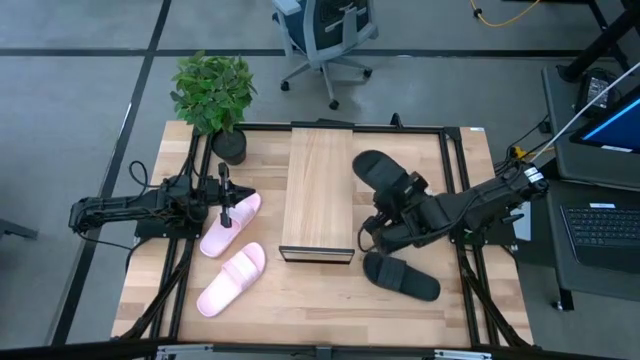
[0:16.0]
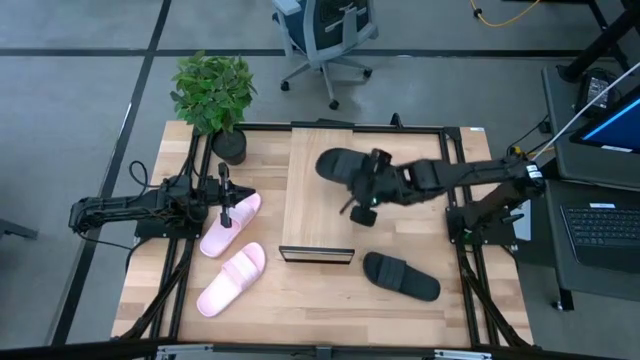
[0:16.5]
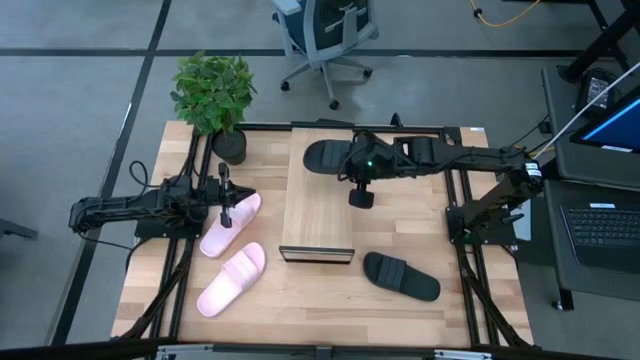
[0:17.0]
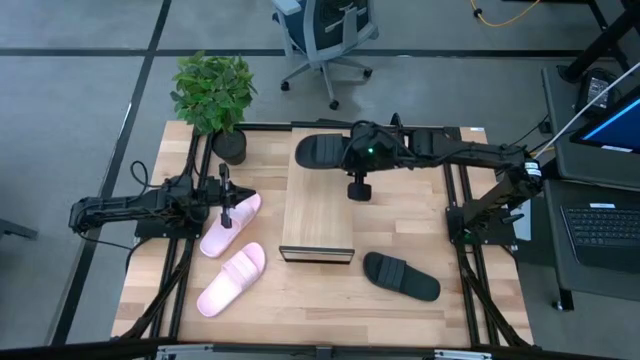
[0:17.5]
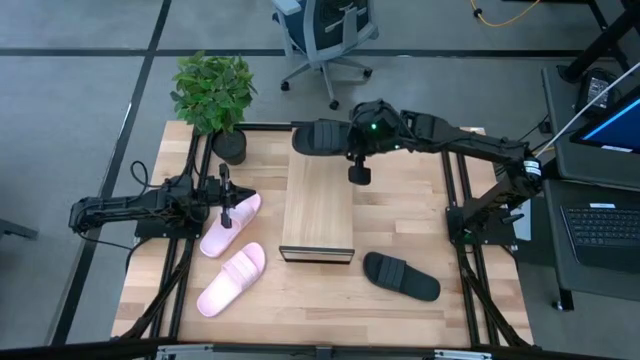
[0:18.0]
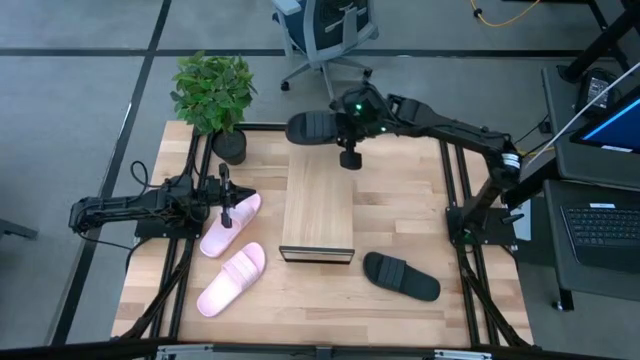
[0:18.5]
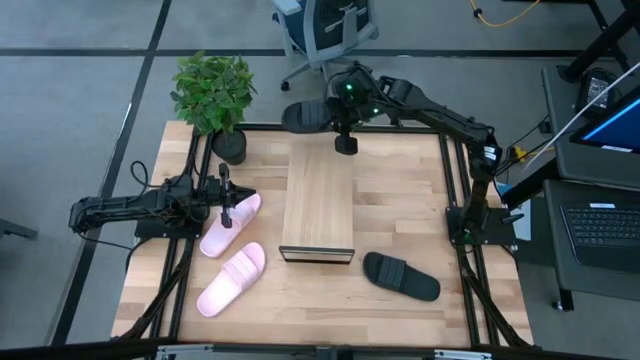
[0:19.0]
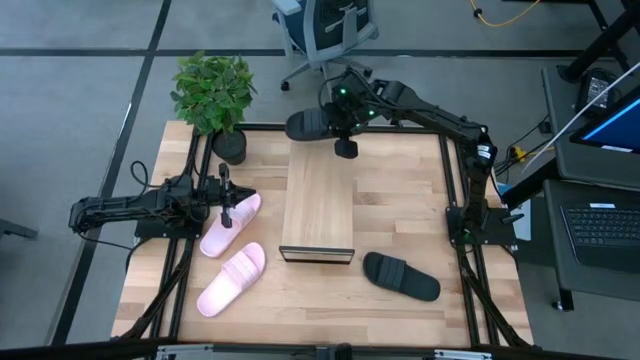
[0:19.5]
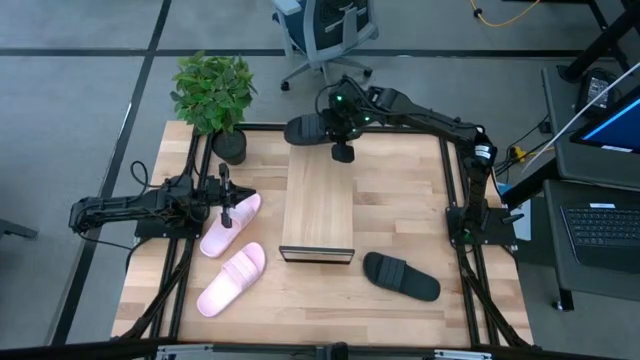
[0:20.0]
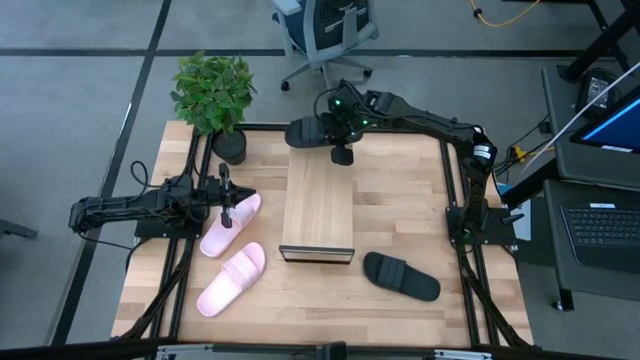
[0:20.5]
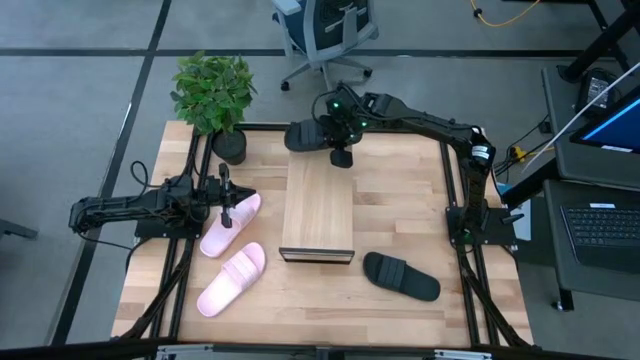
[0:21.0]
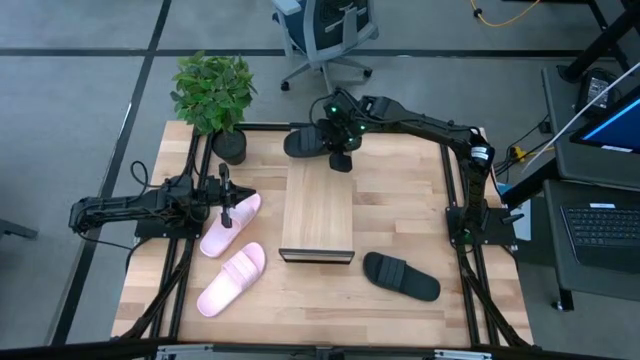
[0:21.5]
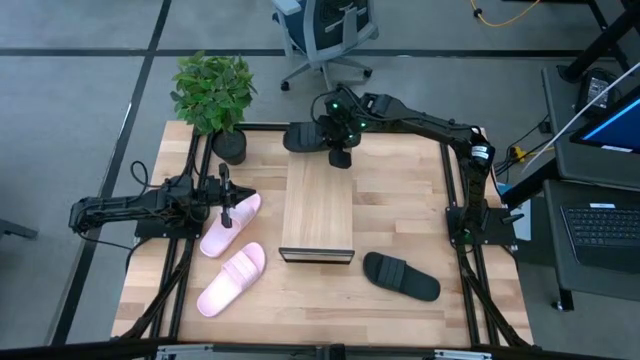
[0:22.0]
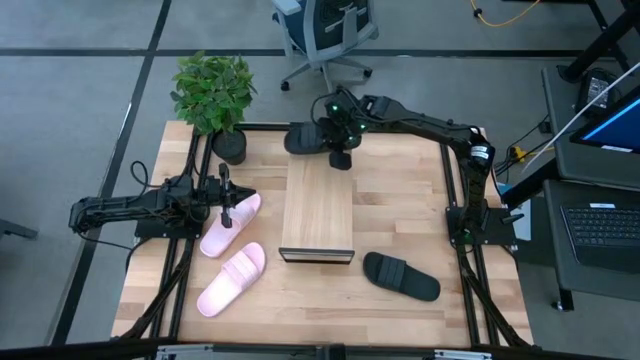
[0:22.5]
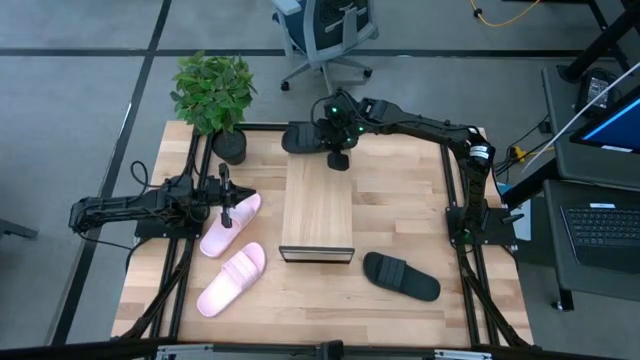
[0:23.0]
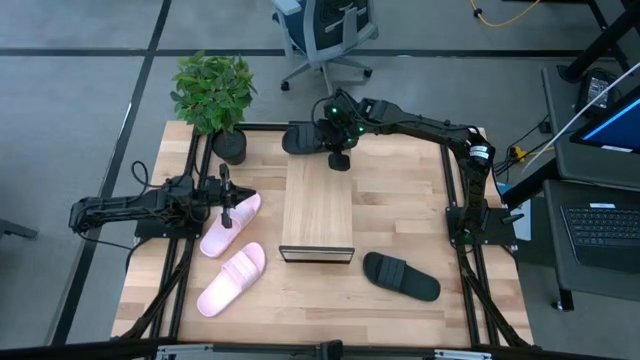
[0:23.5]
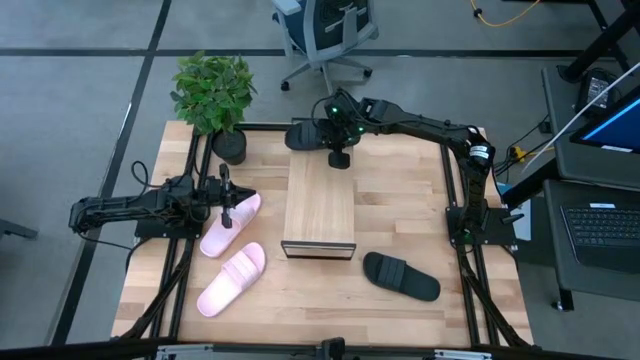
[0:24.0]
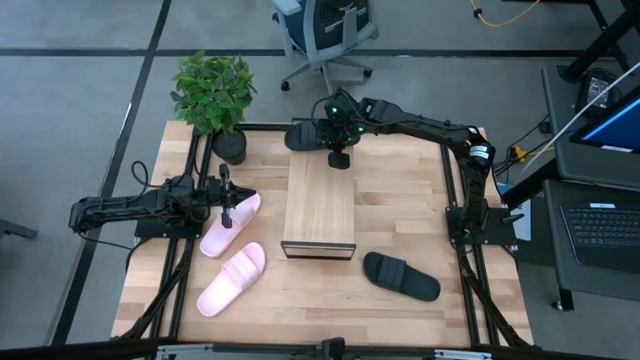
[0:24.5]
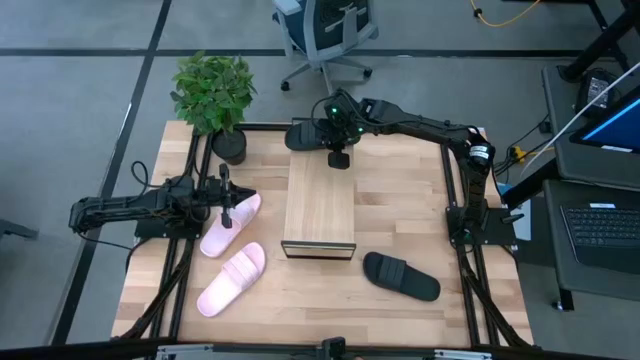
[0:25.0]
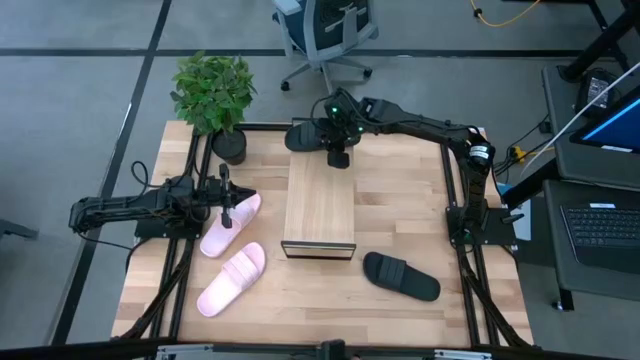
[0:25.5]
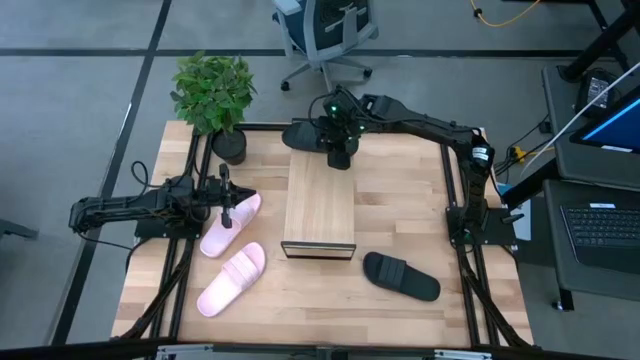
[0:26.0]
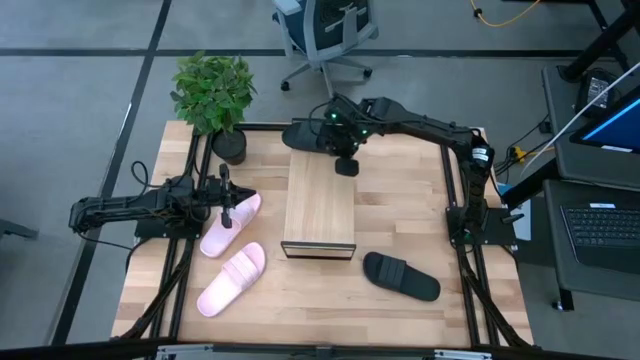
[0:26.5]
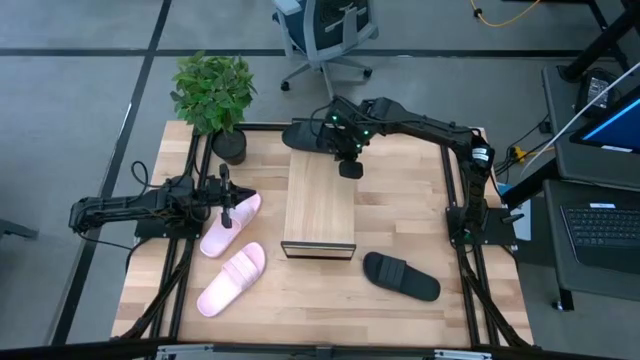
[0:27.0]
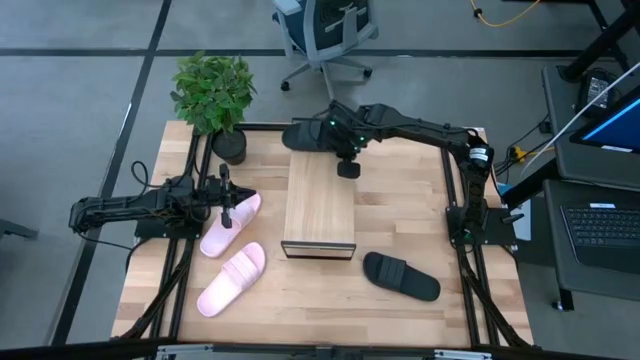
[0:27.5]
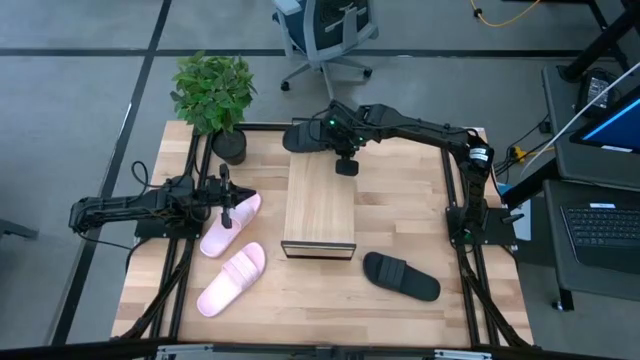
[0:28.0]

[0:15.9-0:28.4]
Task: Pick and place slides into the shelf
Put the top black slide on the shelf

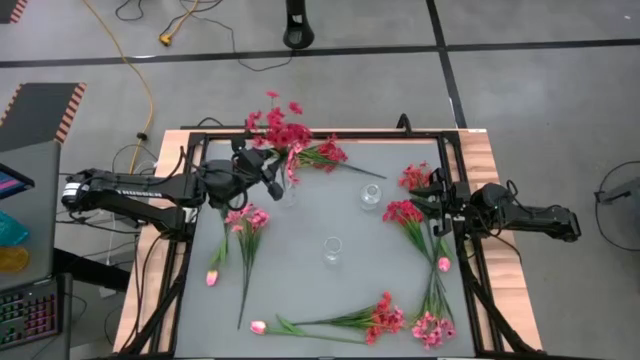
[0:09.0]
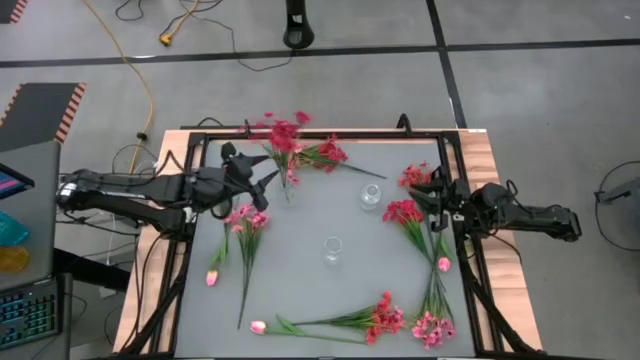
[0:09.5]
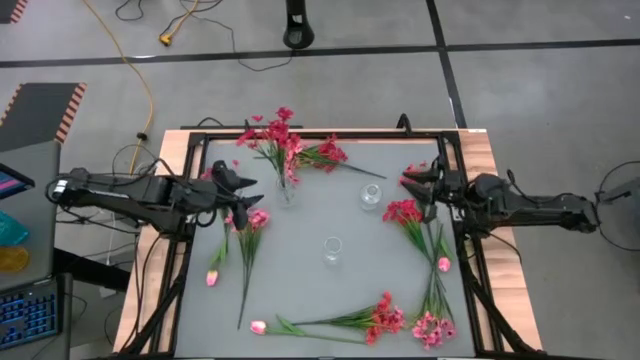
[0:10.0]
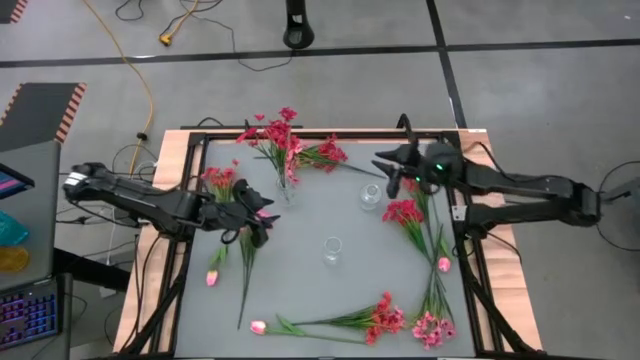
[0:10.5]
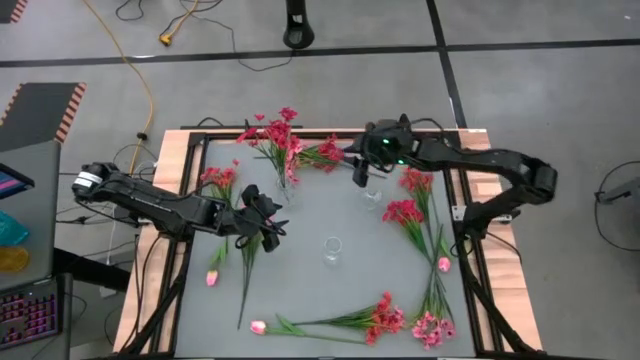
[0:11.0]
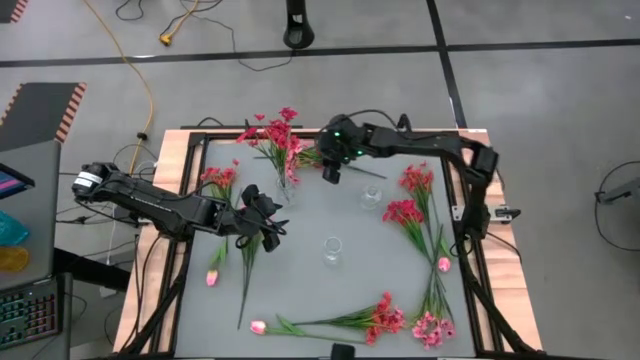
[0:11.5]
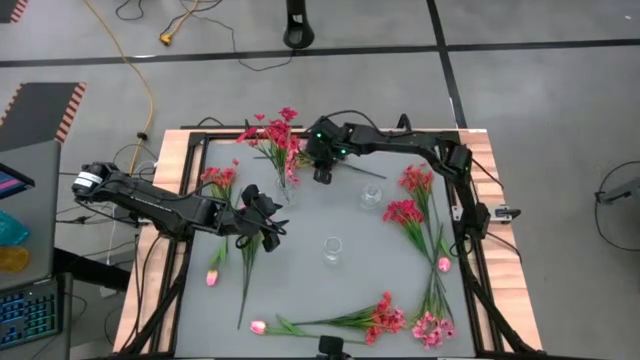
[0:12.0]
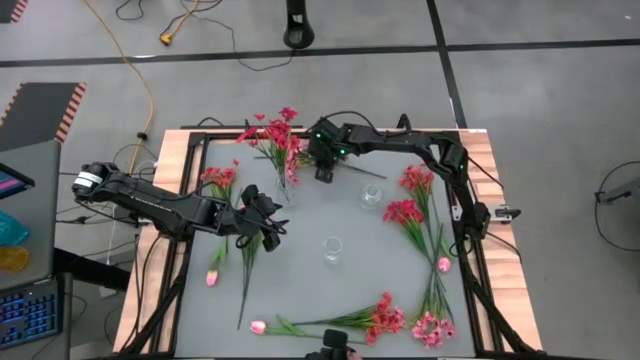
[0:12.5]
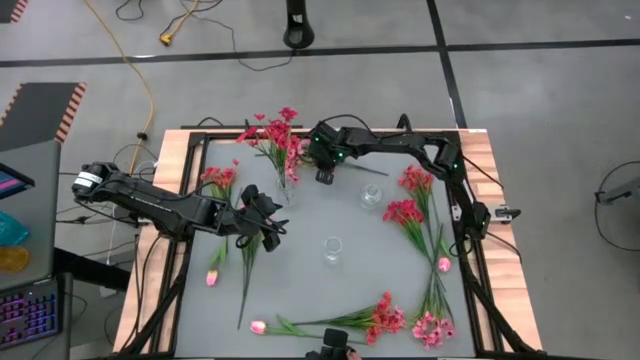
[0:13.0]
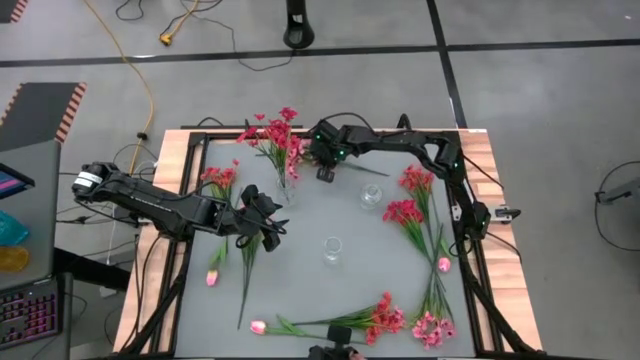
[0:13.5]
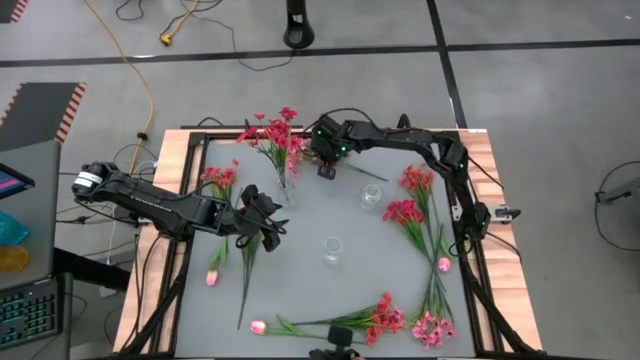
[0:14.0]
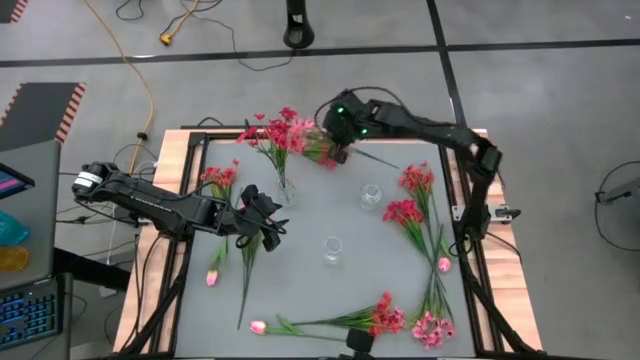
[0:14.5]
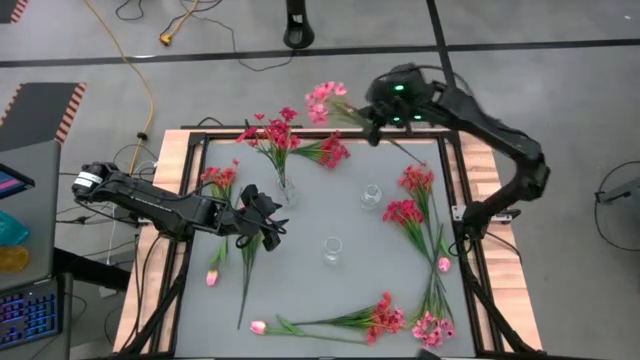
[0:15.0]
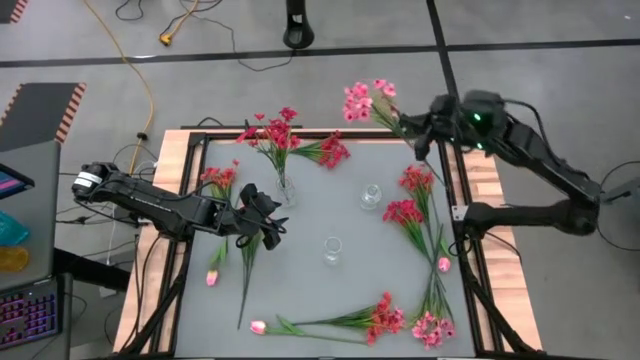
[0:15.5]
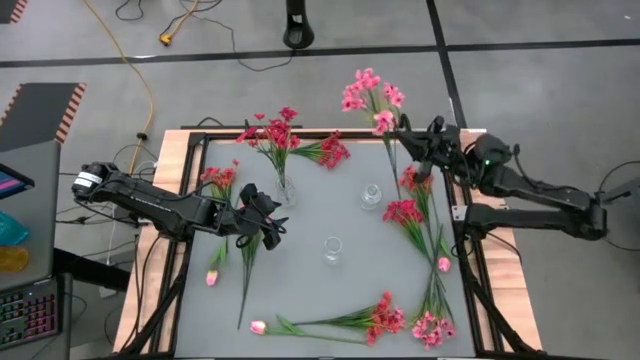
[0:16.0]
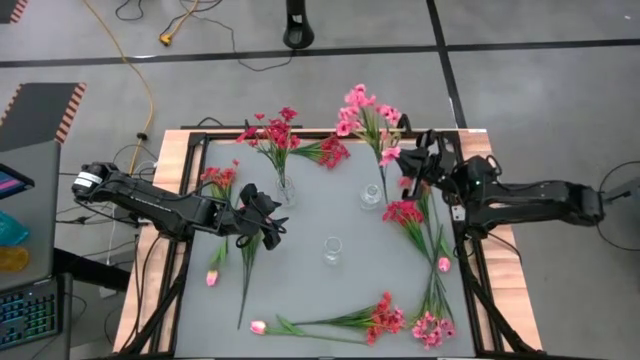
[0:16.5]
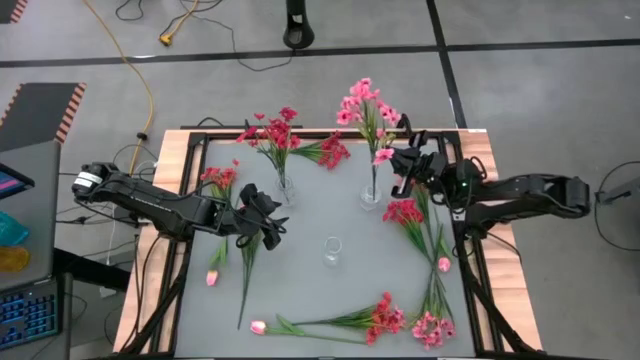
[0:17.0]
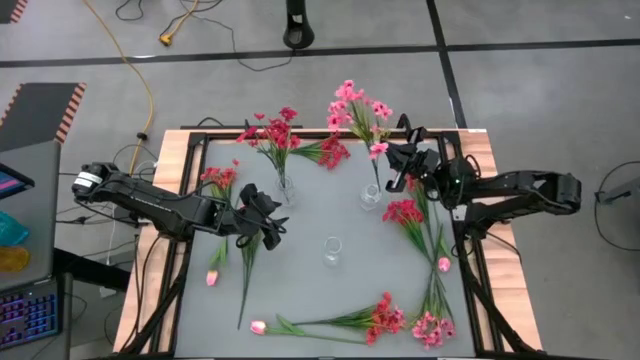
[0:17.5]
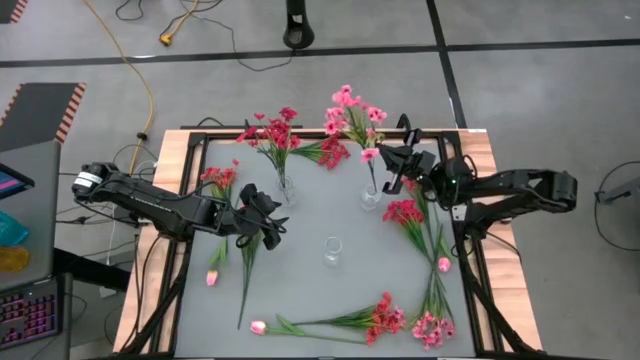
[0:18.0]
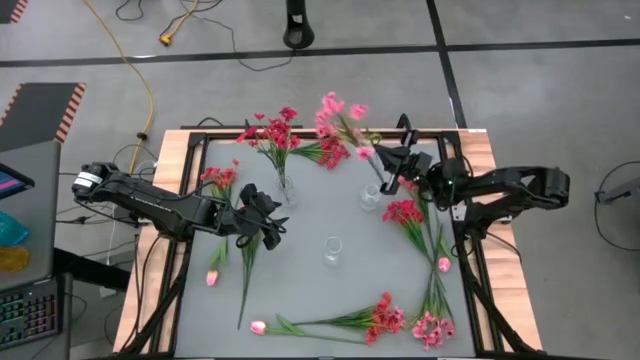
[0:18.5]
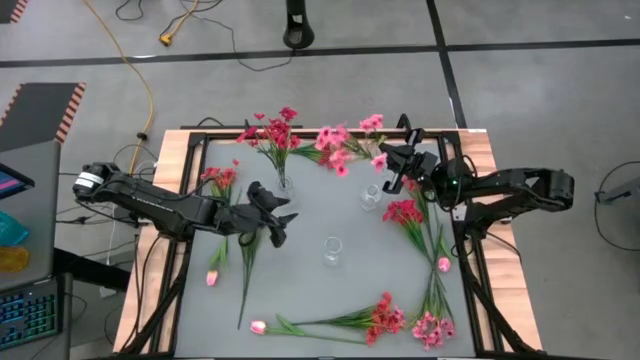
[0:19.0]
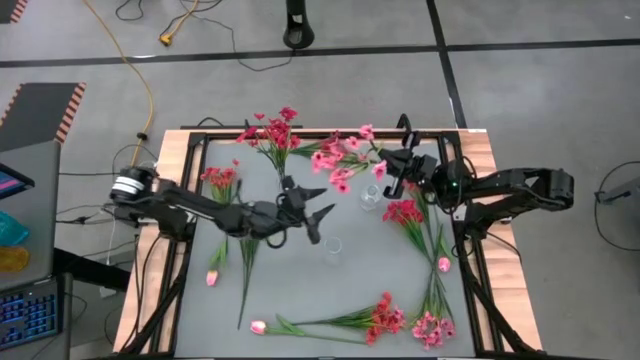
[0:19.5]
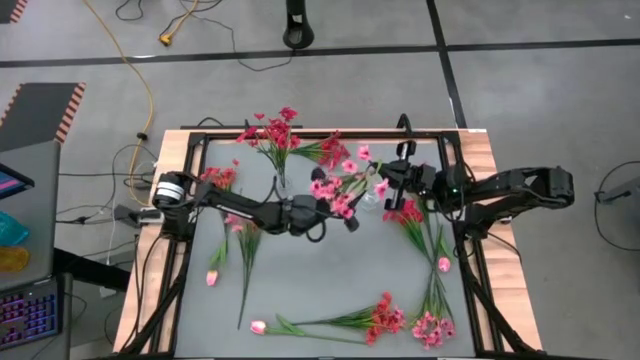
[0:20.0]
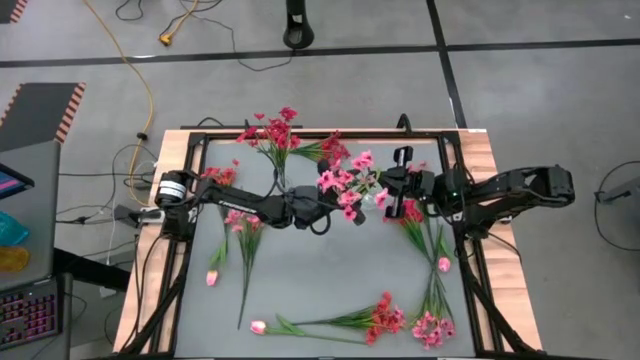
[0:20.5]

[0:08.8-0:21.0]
Task: Sort flowers into vase by color
Put the top center pink flowers into the top right transparent vase
